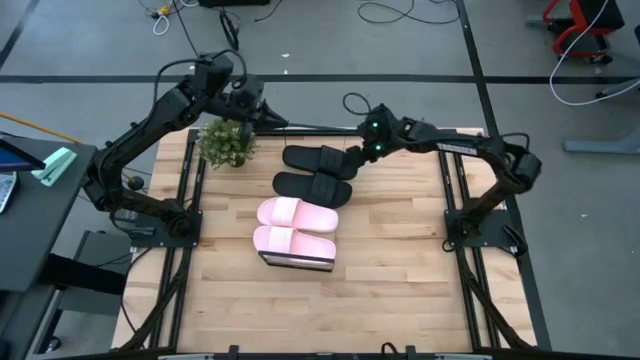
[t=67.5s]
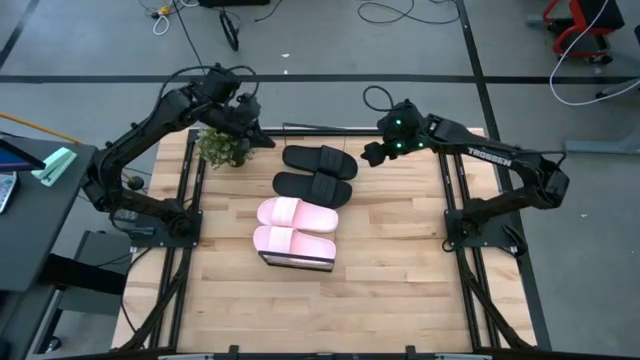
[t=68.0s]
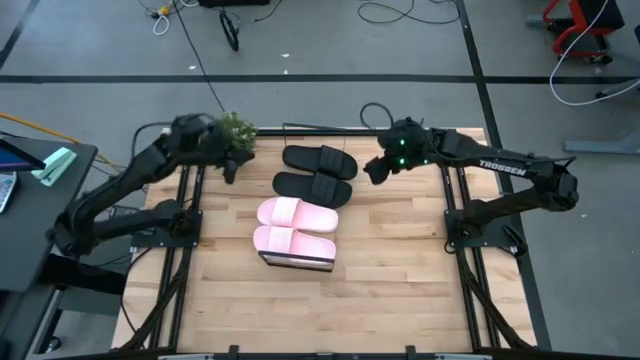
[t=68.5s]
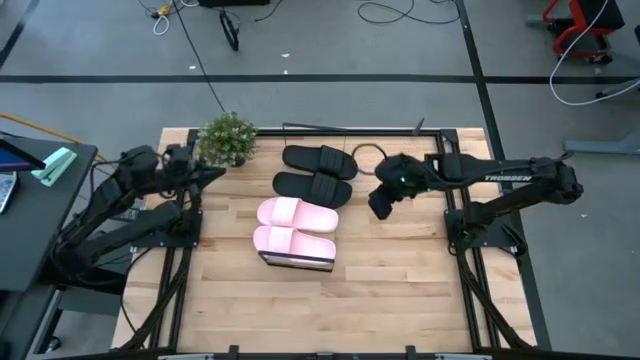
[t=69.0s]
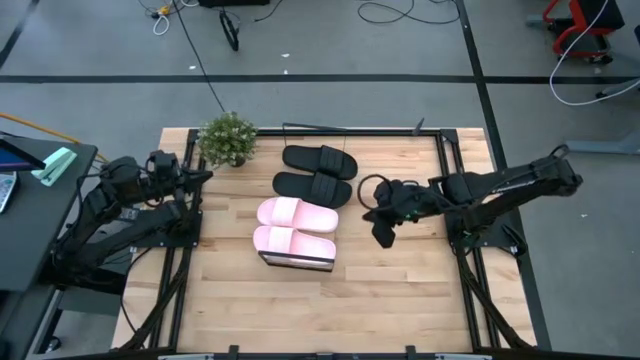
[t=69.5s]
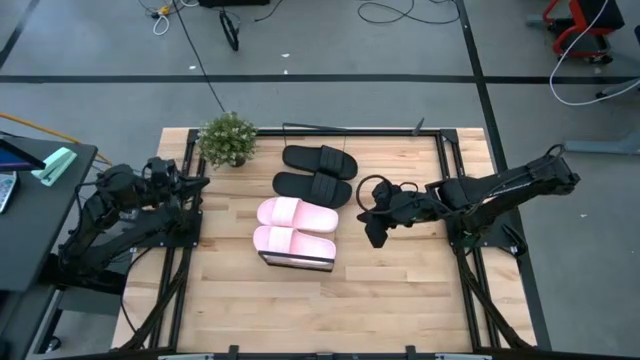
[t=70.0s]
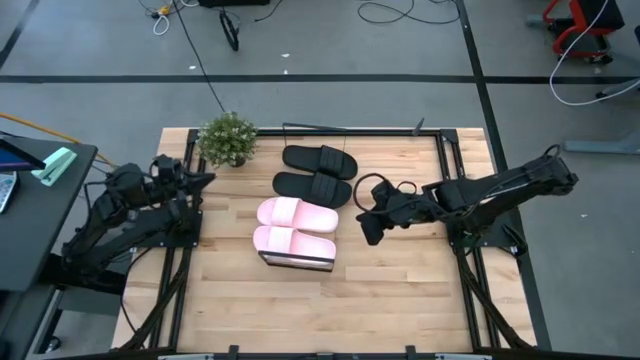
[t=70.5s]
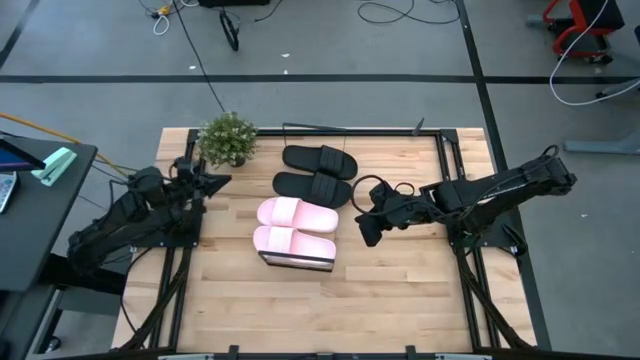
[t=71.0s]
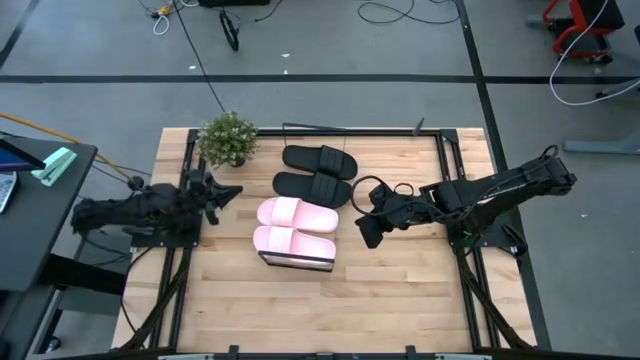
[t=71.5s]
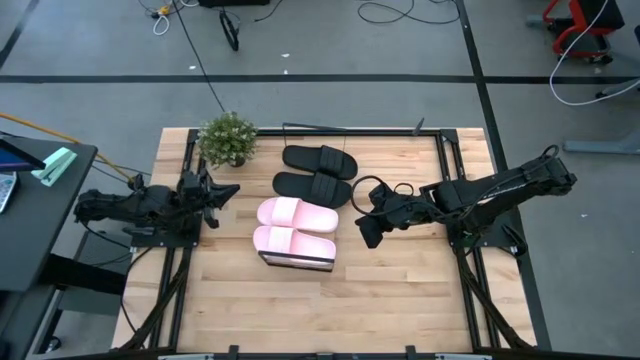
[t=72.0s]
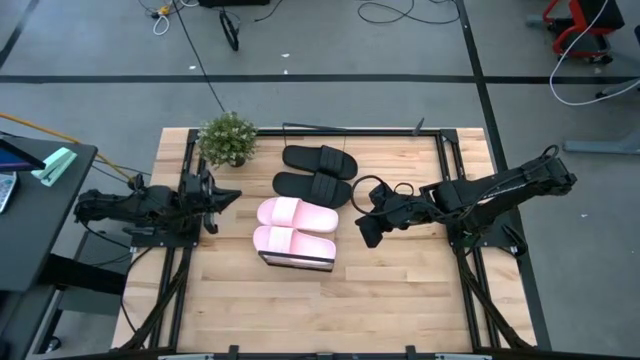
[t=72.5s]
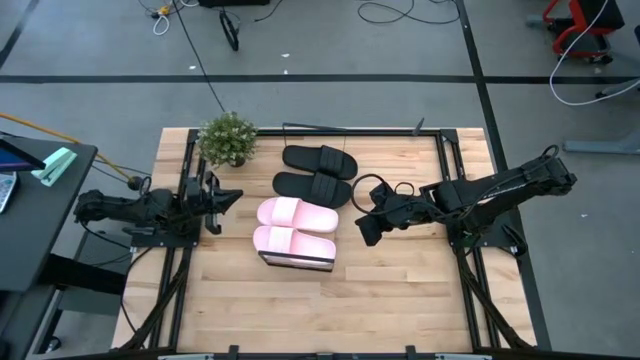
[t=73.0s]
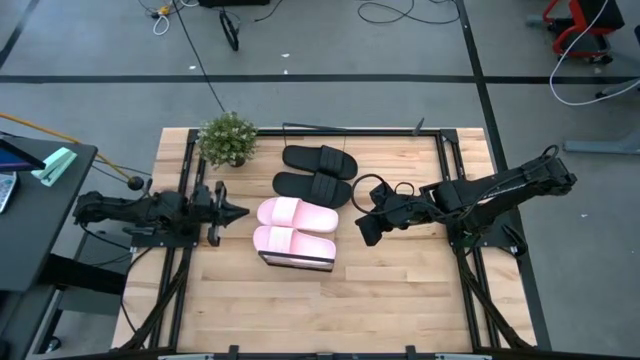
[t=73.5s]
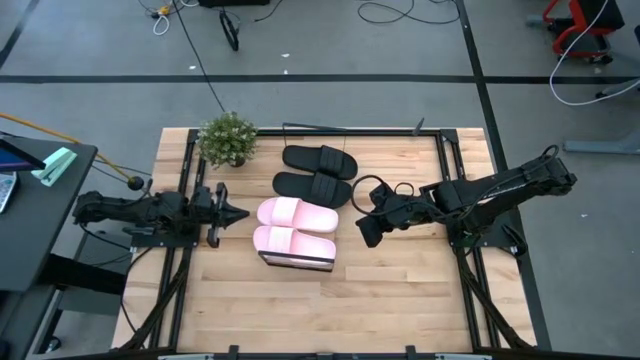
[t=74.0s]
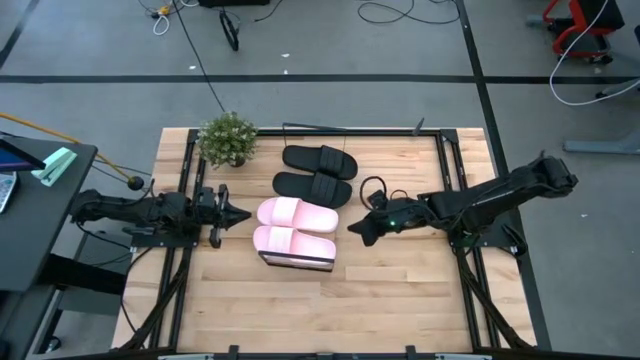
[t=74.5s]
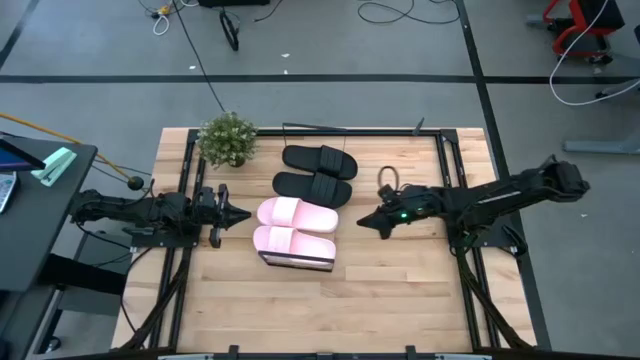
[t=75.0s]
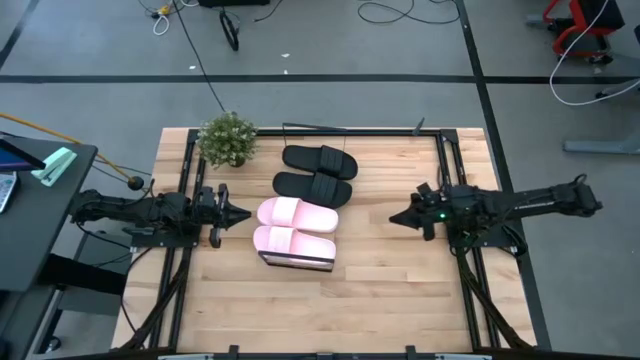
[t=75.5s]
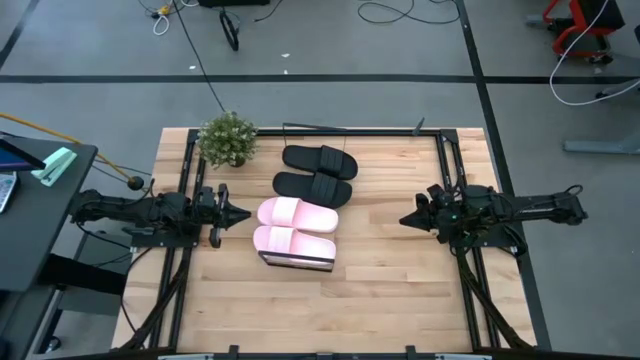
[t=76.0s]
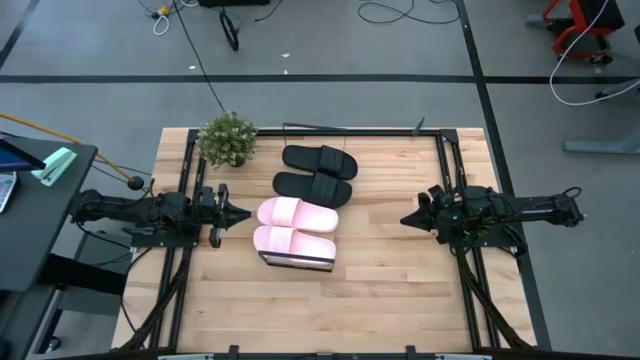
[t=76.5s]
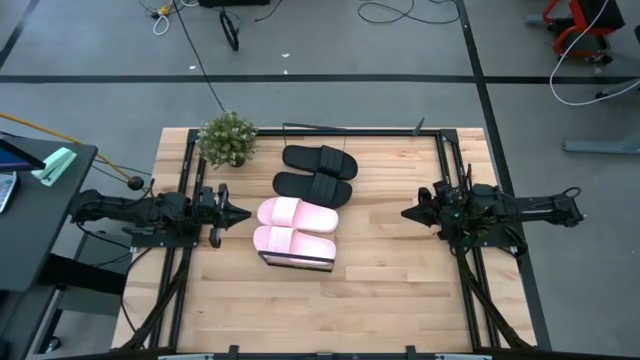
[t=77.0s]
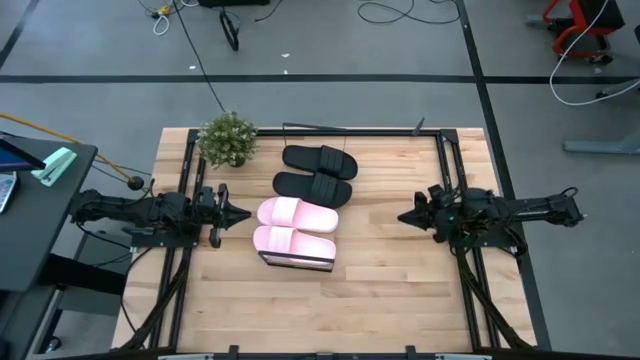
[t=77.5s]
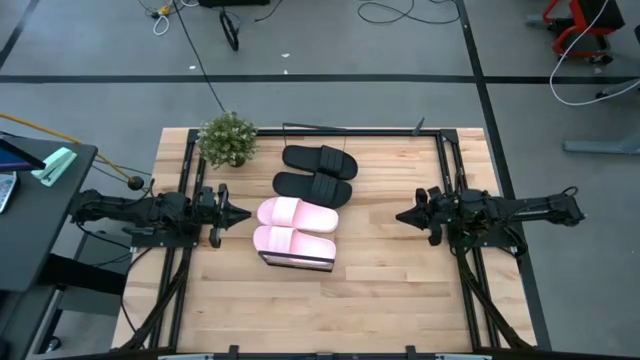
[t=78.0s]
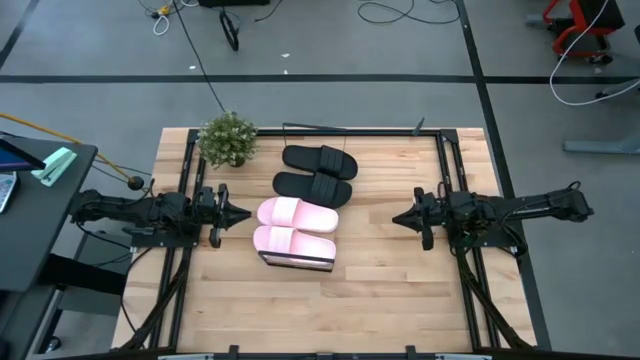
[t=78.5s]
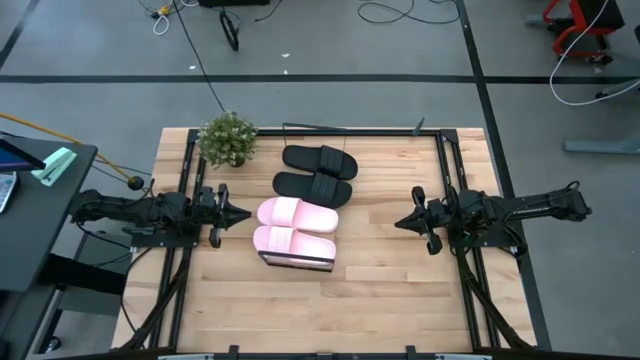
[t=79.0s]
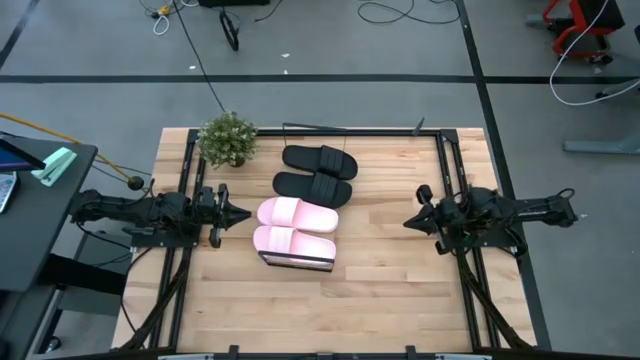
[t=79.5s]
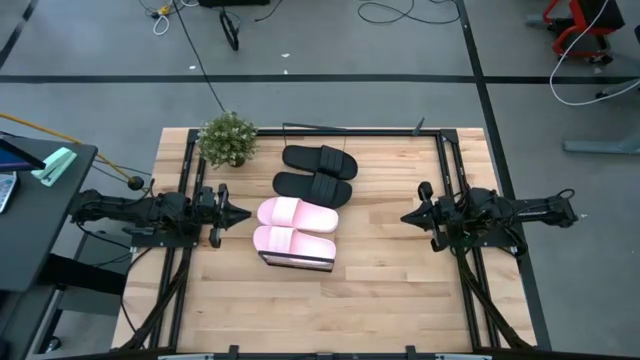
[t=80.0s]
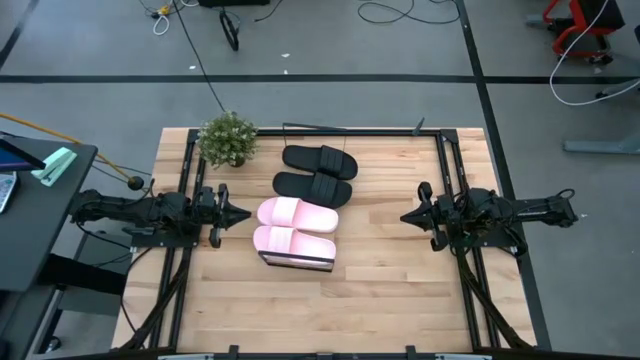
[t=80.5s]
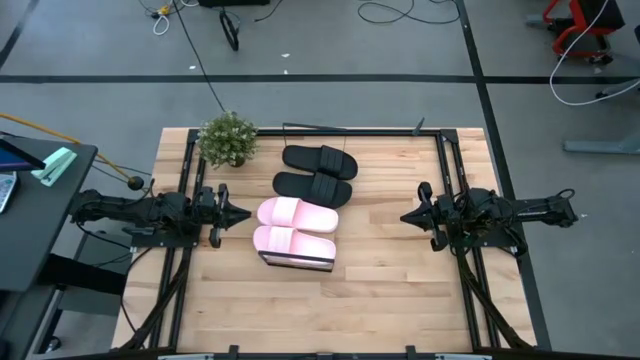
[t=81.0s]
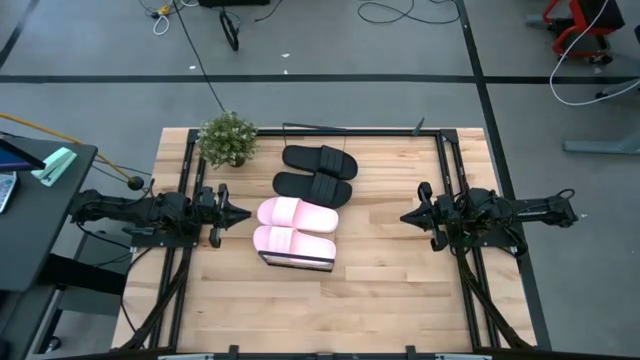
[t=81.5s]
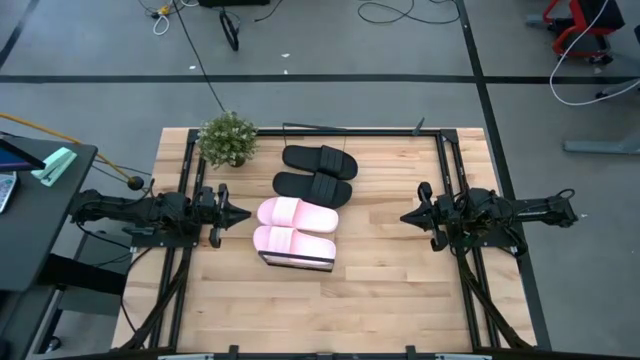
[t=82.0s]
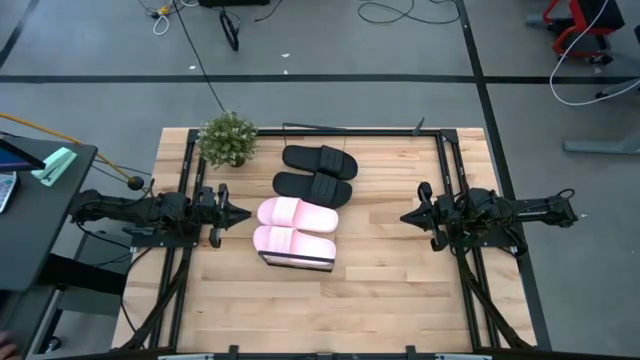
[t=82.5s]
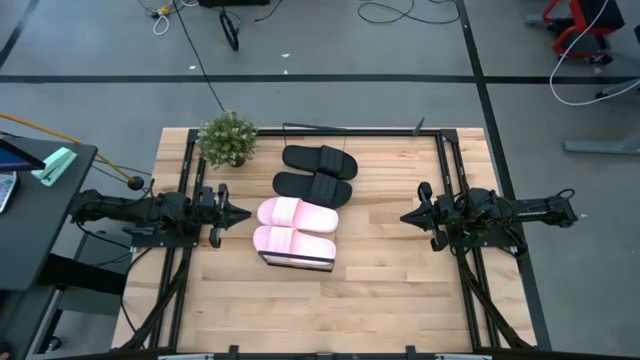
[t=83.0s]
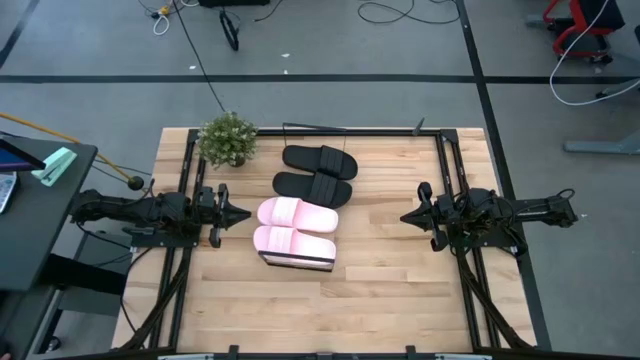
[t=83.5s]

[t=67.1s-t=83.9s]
Task: Pick and place slides into the shelf
Return to Home Position

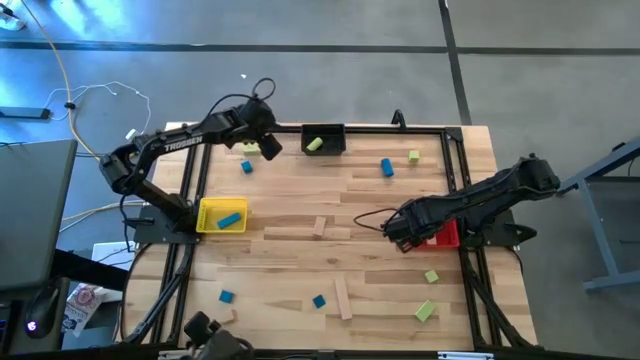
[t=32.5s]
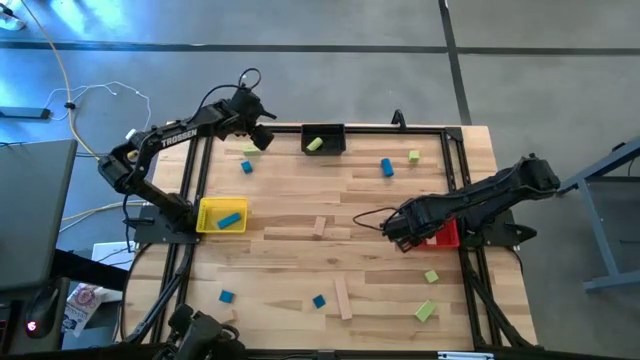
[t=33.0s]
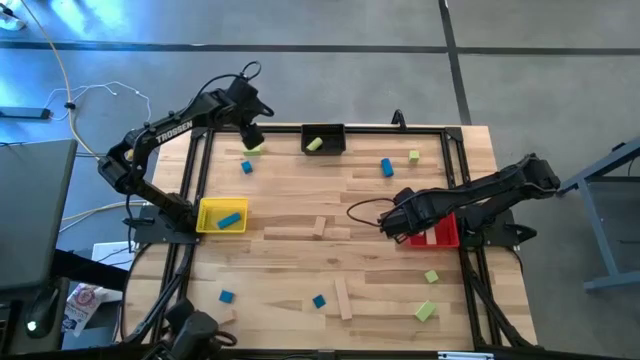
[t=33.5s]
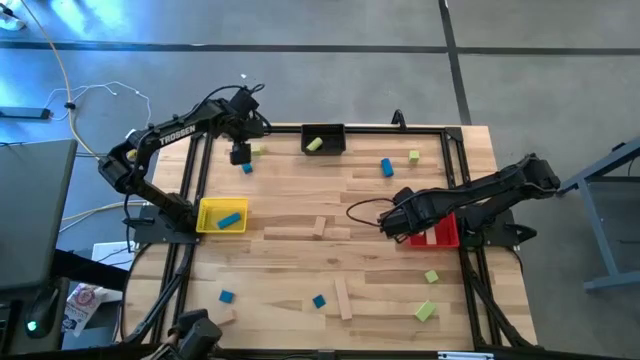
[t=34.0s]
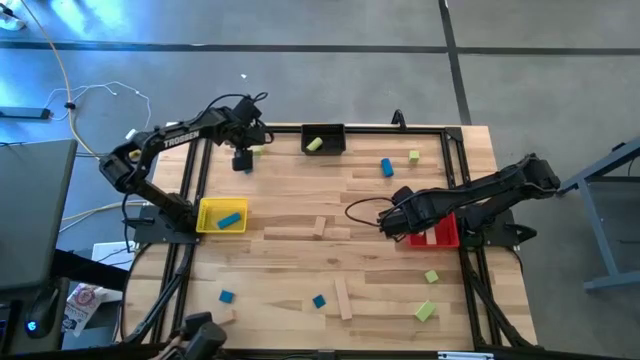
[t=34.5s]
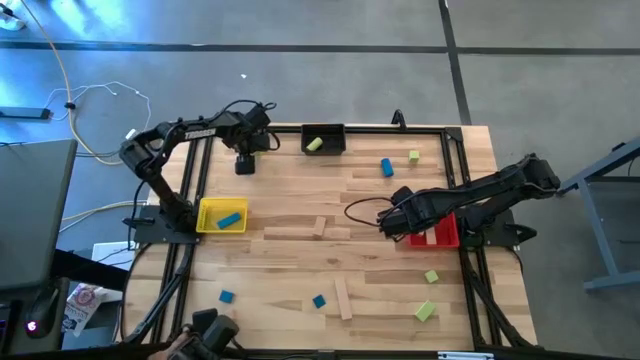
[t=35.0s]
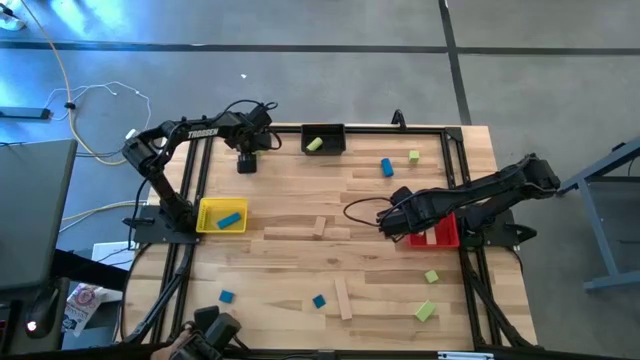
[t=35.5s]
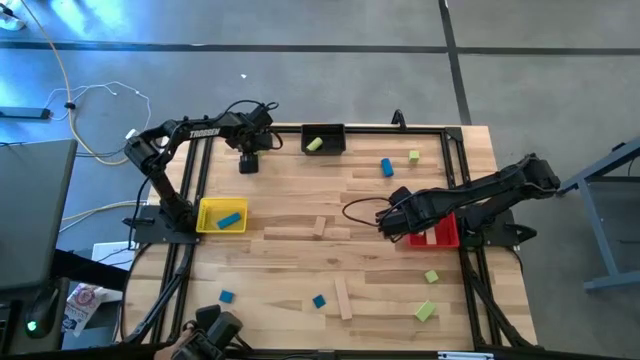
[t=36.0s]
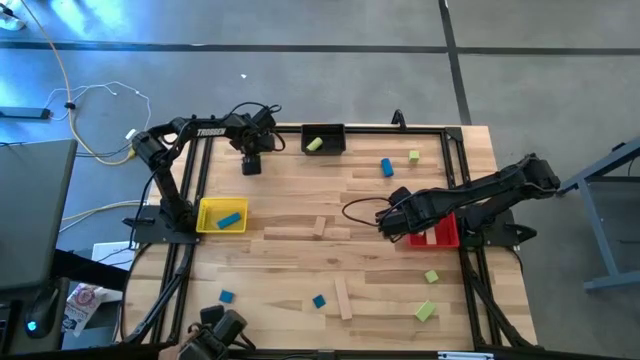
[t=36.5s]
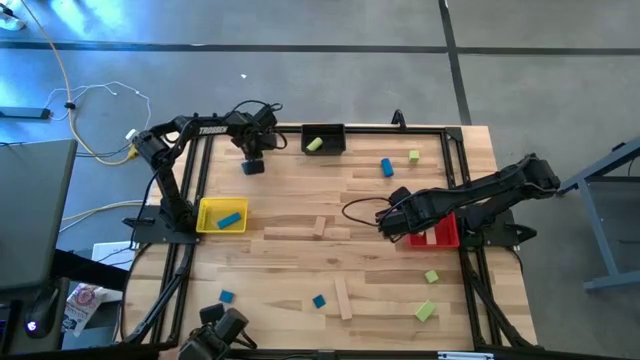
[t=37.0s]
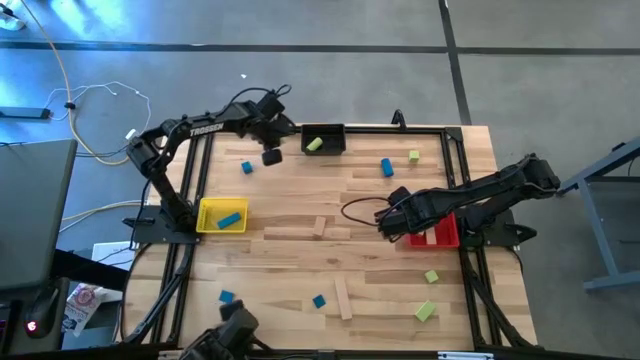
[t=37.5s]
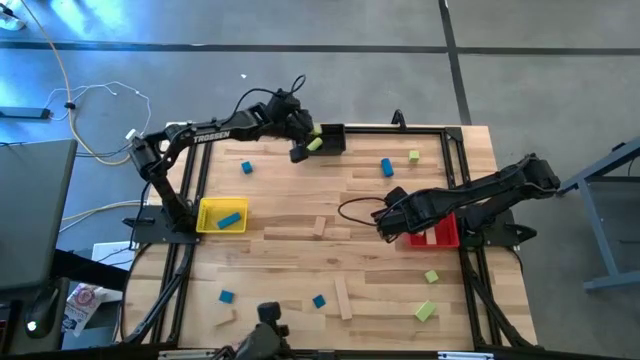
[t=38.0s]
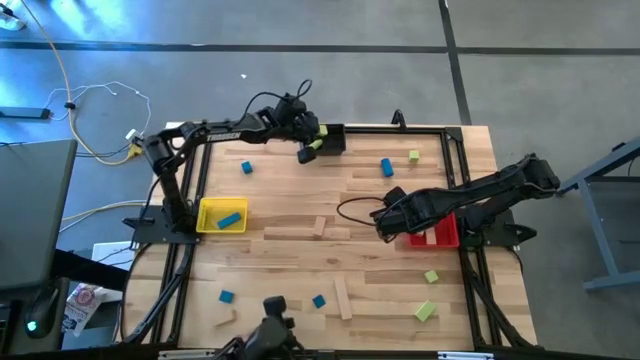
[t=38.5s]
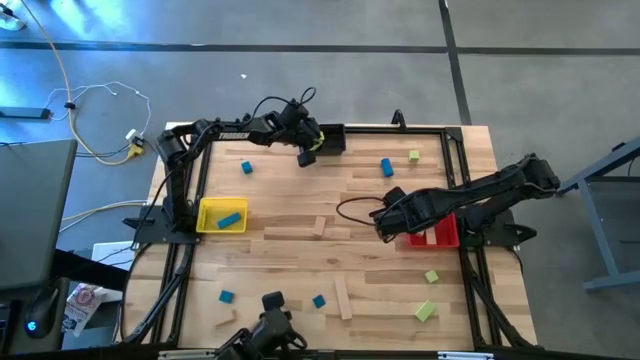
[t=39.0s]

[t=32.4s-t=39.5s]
Task: Sort & place blocks by color
Put the light green block into the black bin
